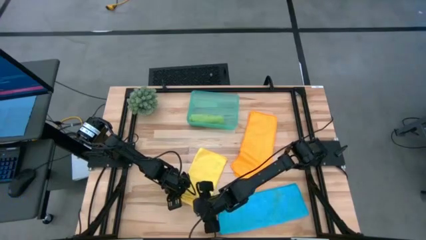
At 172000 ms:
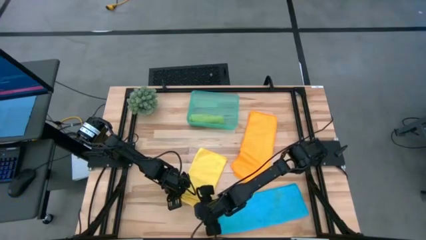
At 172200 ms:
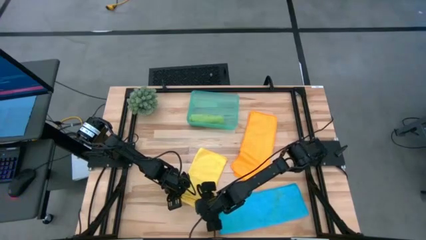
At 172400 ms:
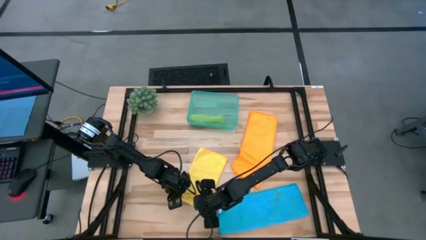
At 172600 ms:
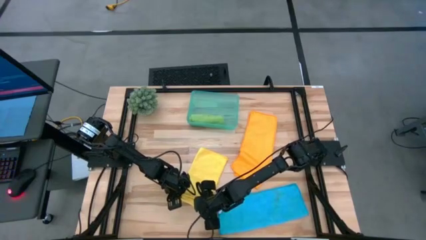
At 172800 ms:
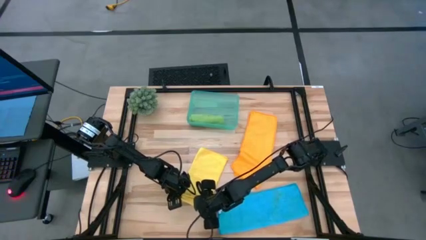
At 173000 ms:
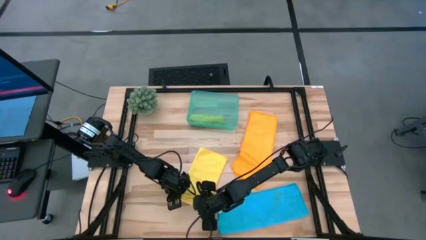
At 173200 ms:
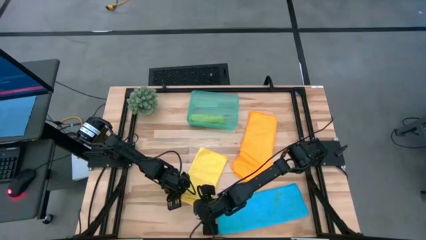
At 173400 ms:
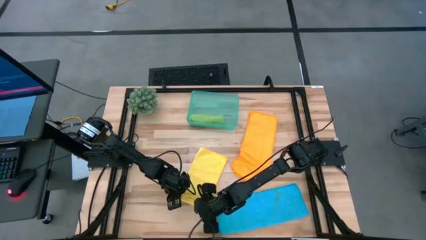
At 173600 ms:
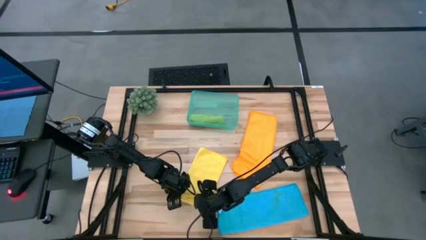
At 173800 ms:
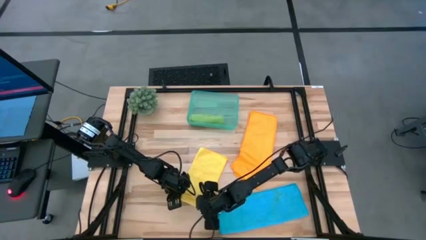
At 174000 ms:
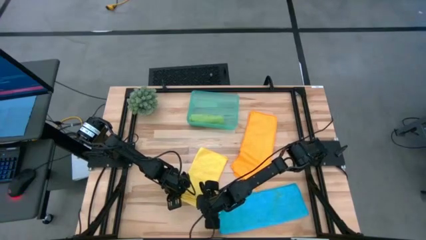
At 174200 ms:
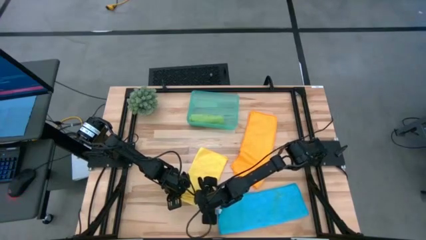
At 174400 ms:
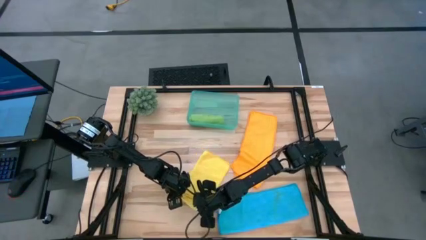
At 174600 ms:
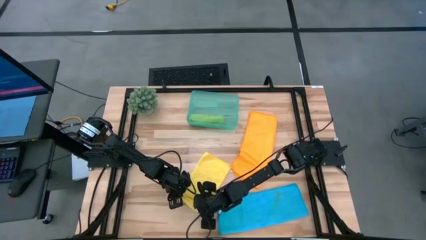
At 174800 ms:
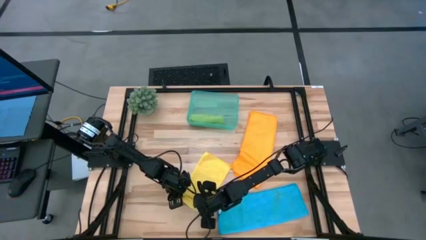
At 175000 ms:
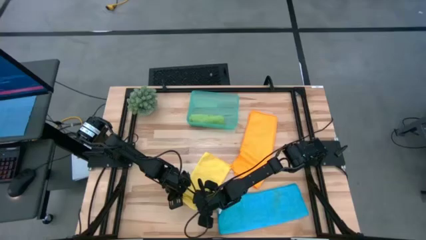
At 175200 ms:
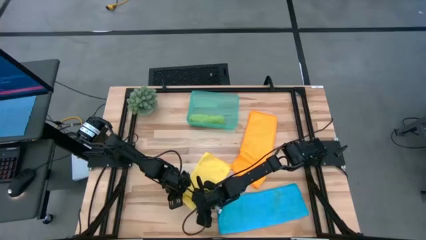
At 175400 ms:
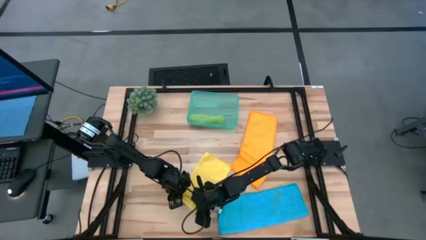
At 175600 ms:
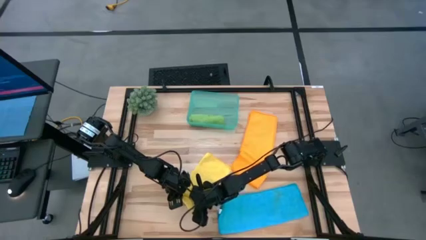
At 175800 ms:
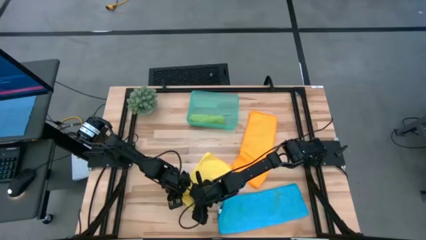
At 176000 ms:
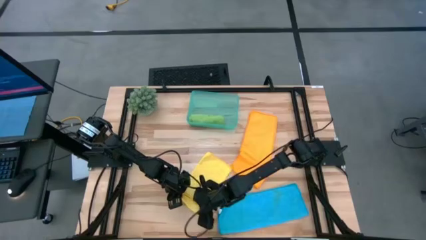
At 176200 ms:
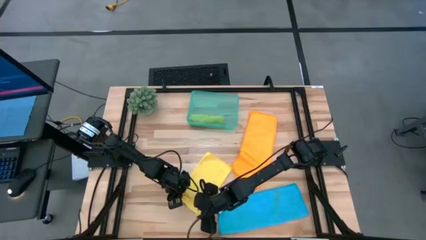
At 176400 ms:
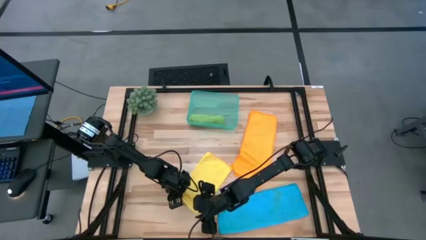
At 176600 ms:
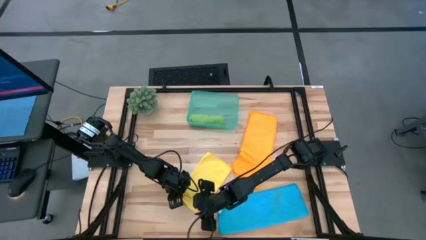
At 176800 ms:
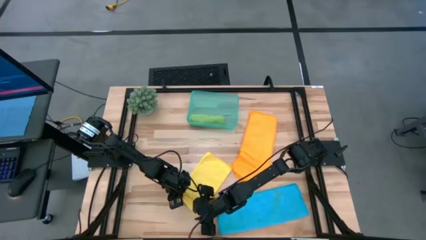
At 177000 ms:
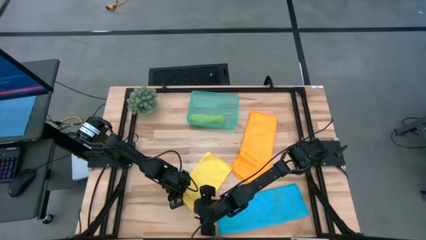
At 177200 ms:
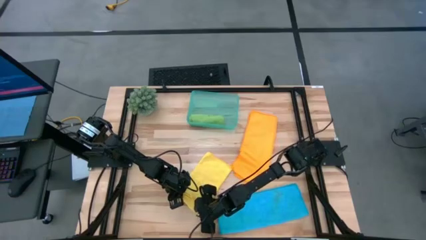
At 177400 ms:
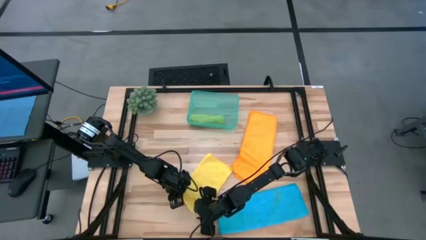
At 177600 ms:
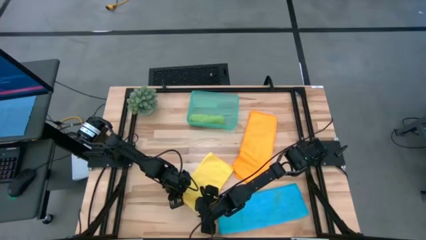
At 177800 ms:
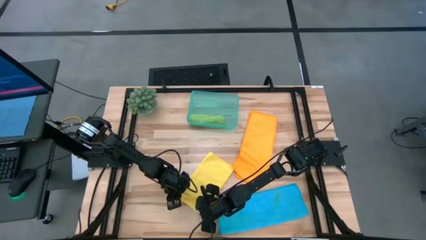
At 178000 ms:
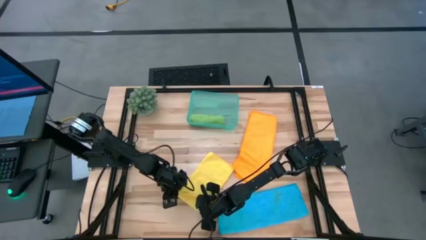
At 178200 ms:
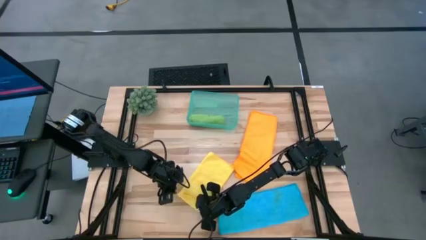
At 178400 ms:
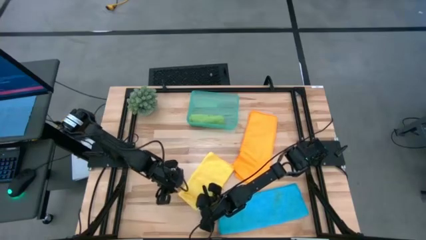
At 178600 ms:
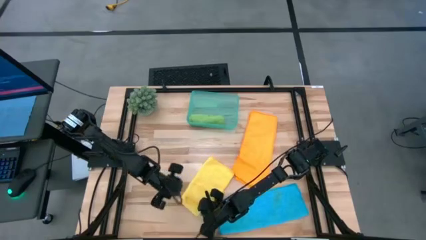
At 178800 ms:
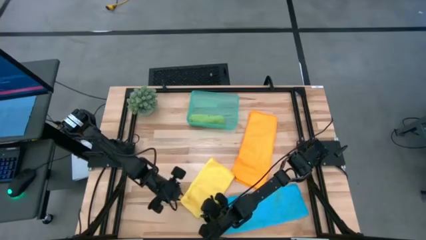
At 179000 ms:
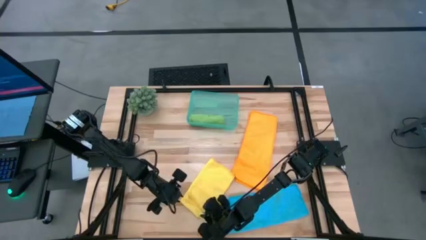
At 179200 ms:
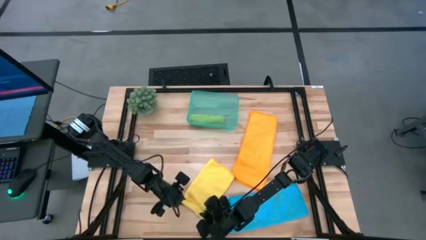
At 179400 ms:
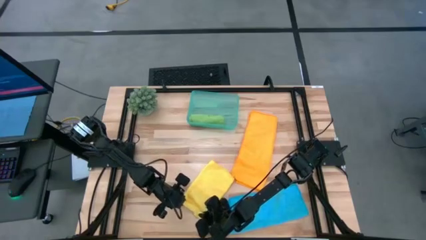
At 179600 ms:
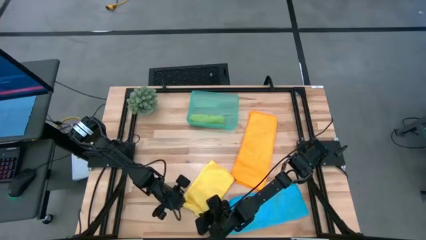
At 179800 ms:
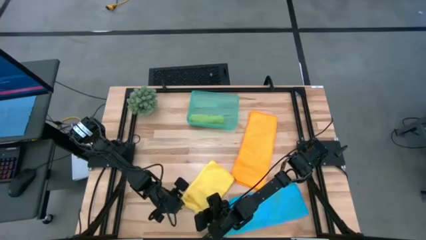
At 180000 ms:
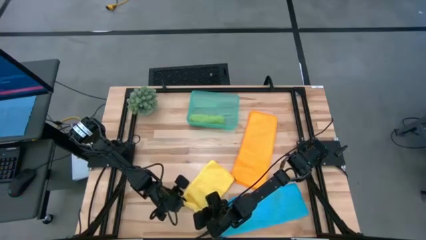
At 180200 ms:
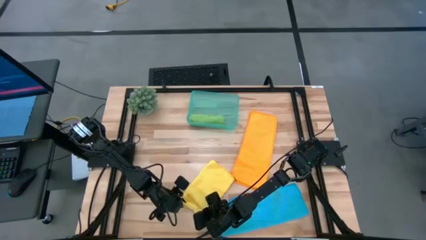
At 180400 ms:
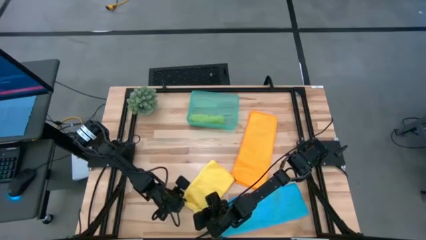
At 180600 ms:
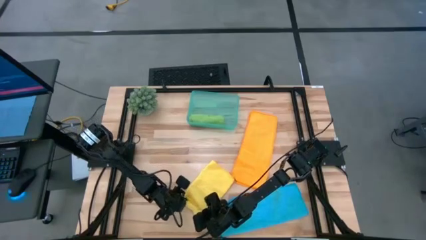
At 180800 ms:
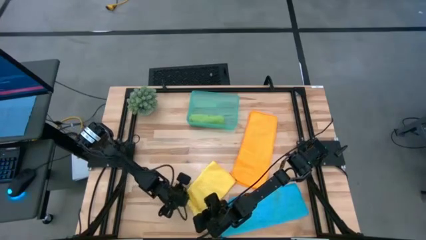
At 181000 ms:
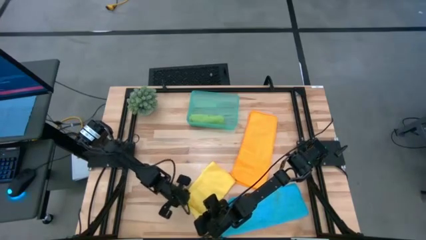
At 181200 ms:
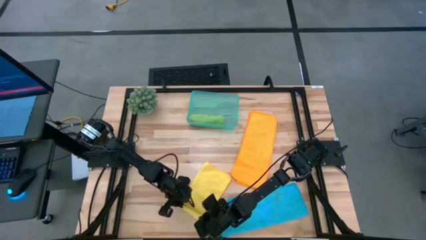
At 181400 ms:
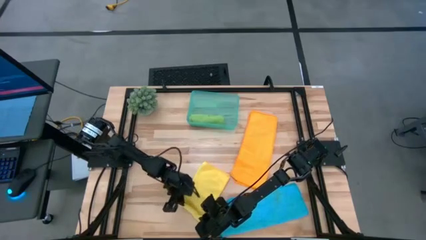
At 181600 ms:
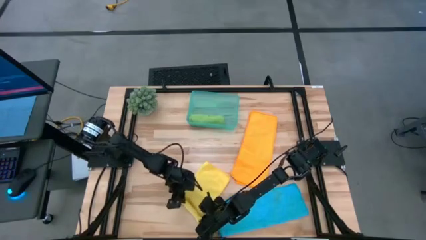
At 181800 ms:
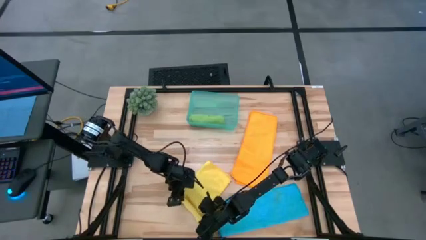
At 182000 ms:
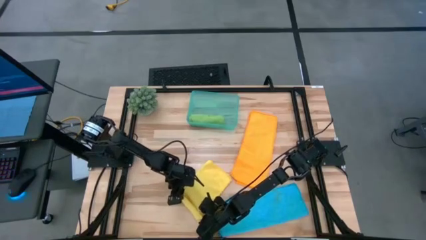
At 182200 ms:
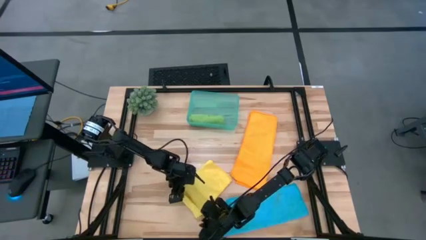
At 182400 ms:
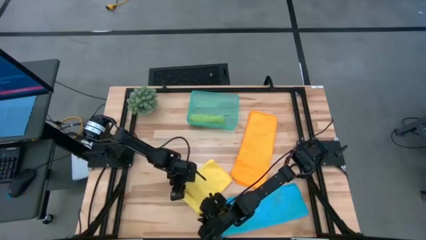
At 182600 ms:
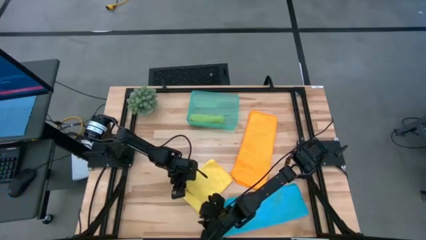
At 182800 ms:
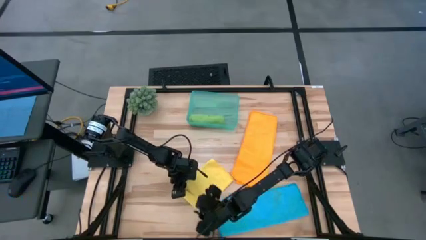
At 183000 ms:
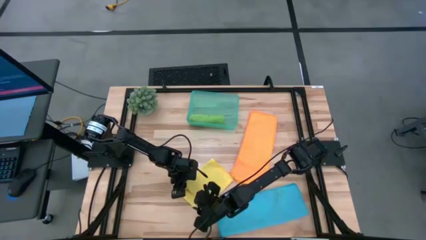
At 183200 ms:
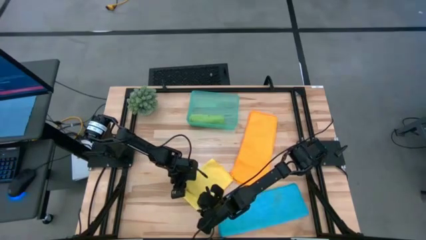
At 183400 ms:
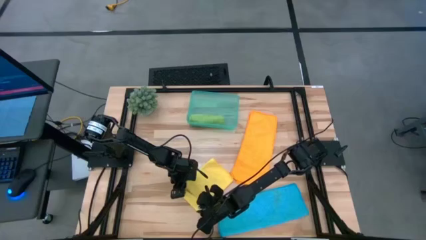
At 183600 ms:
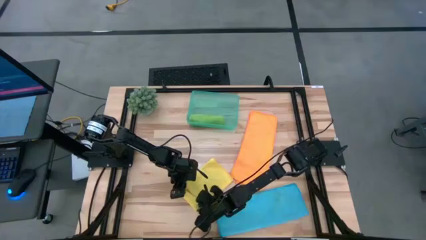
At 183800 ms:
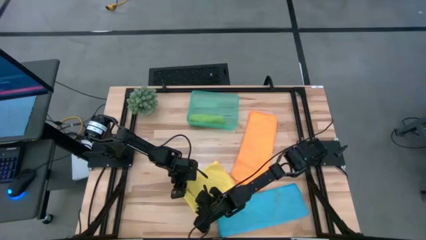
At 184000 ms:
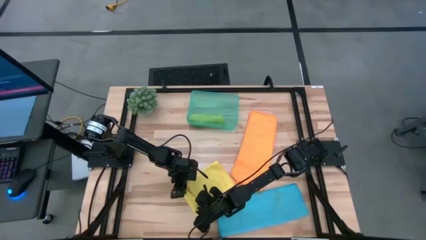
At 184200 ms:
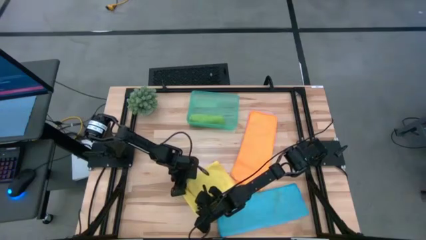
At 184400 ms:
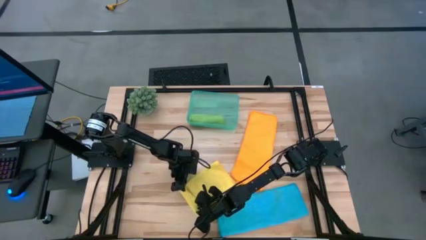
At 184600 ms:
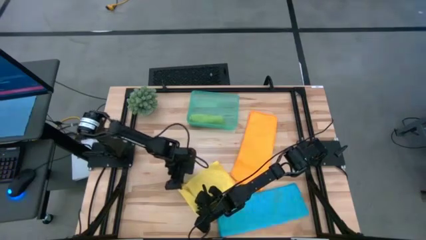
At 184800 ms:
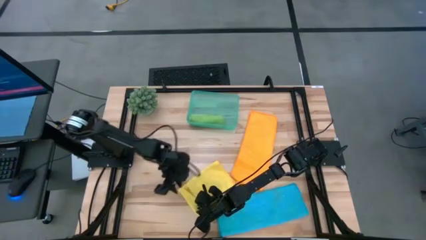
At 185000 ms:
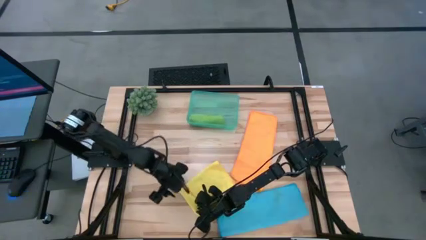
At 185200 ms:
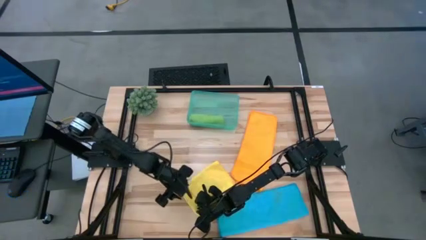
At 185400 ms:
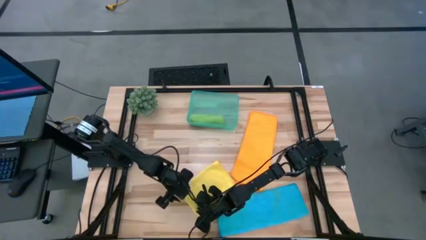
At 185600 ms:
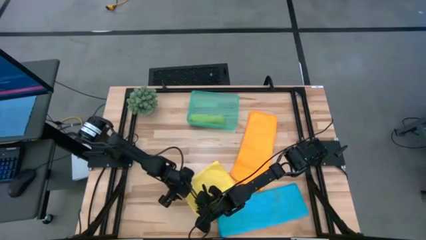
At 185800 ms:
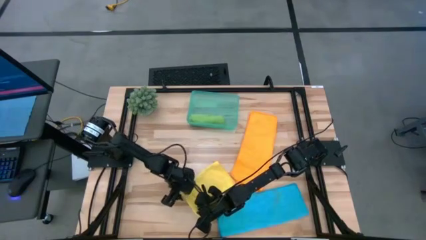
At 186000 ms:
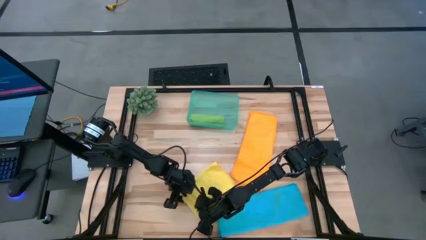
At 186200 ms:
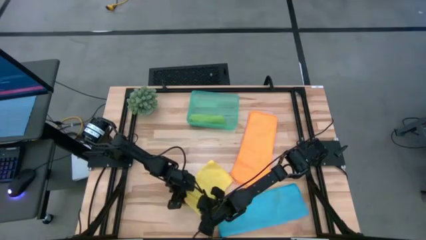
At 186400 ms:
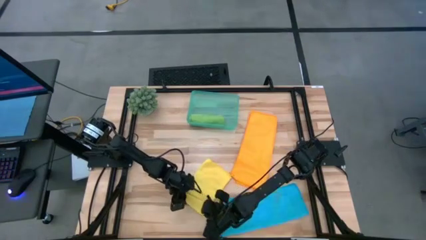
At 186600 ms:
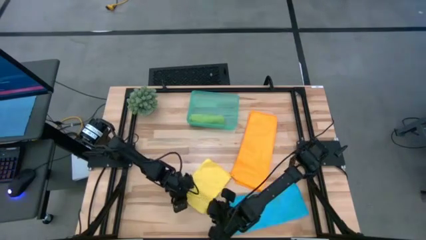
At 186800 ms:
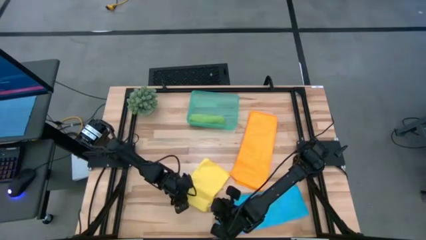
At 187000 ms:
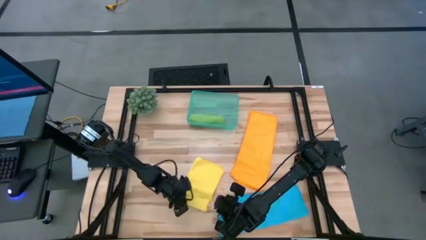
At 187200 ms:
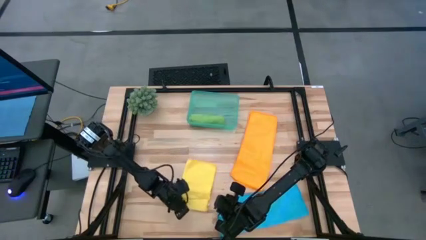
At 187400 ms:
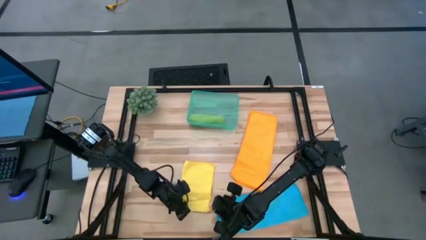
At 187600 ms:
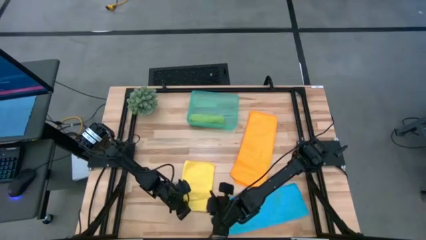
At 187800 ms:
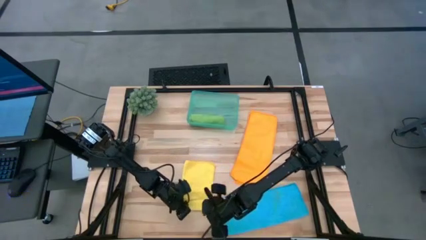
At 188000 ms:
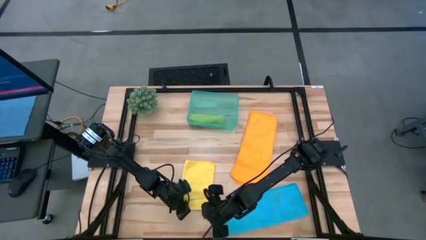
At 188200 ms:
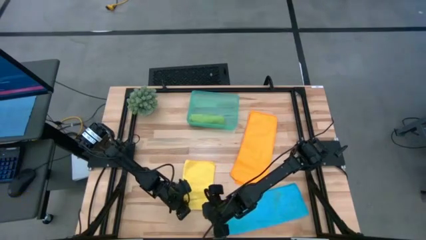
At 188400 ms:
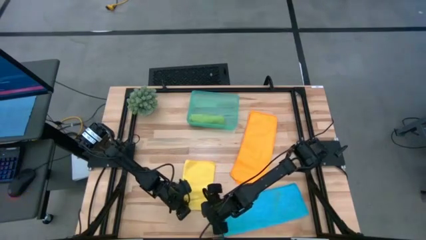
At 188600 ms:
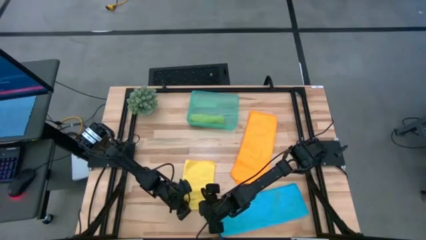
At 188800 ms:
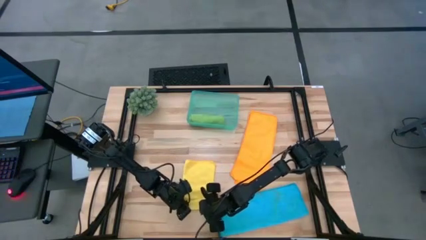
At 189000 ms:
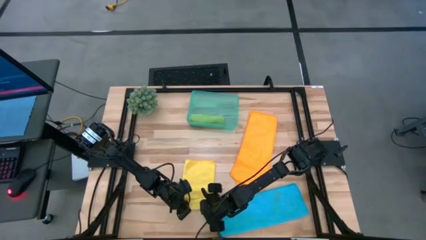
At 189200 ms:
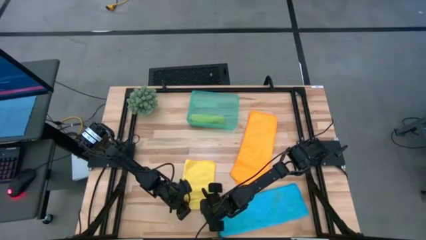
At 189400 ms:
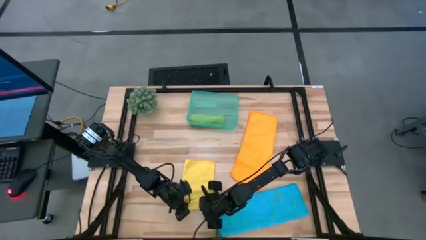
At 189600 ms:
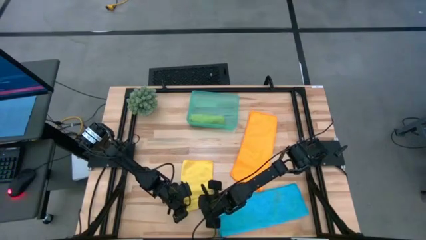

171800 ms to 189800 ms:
Task: Roll microfiber towels into tight, uniform cylinder then place into a basket
Roll the yellow towel
